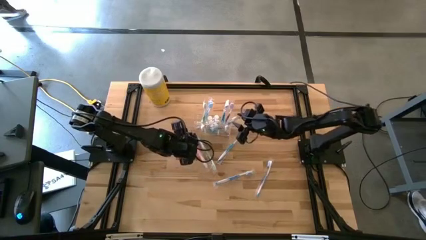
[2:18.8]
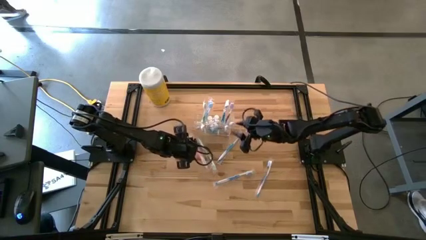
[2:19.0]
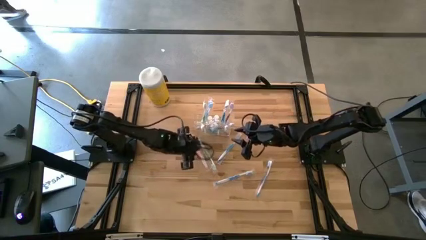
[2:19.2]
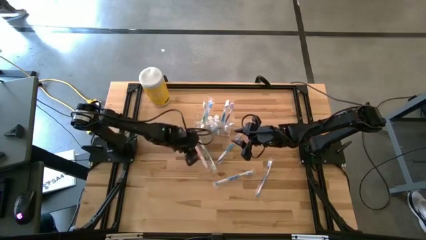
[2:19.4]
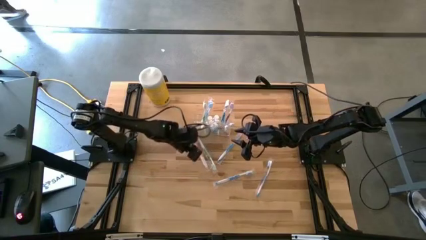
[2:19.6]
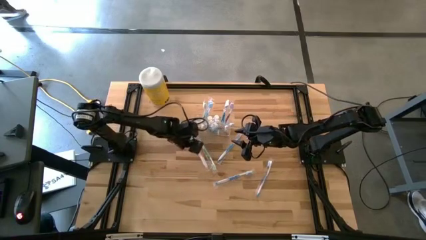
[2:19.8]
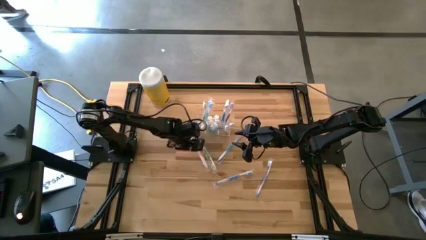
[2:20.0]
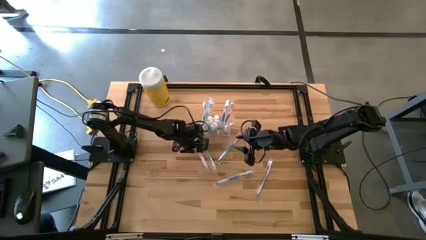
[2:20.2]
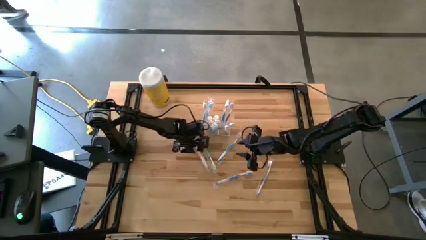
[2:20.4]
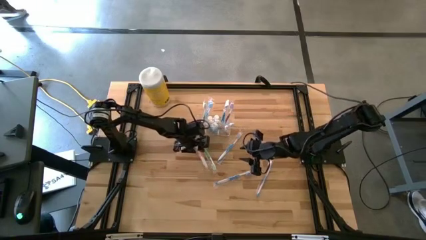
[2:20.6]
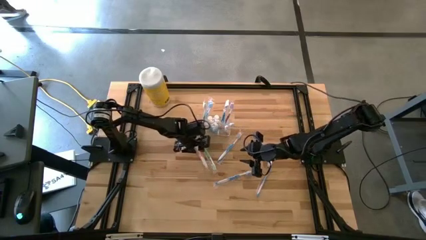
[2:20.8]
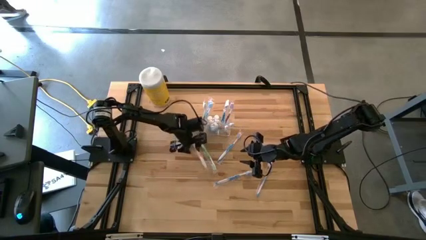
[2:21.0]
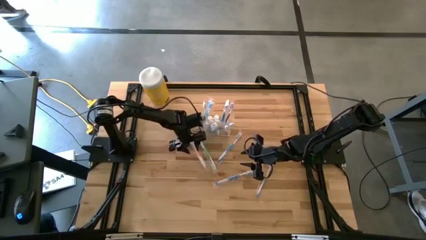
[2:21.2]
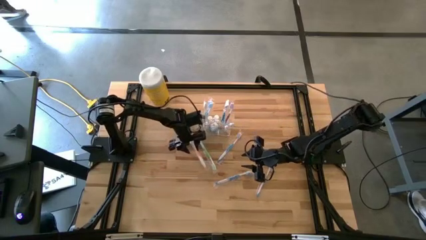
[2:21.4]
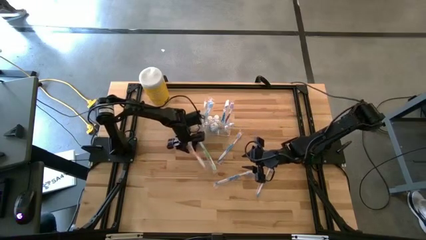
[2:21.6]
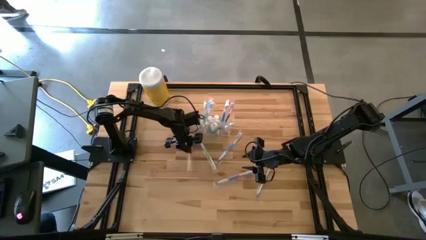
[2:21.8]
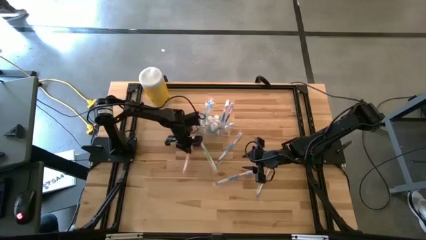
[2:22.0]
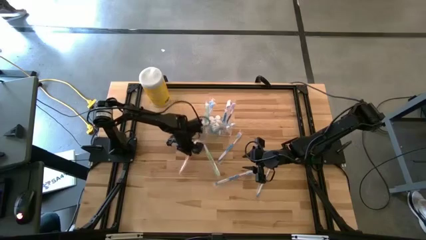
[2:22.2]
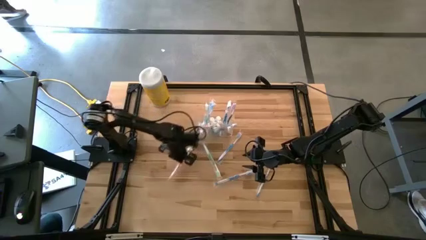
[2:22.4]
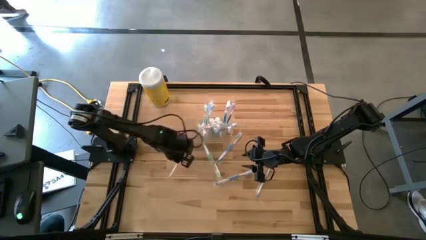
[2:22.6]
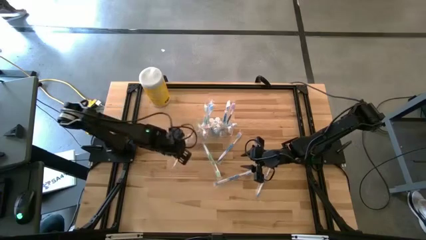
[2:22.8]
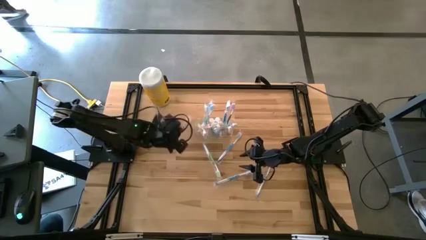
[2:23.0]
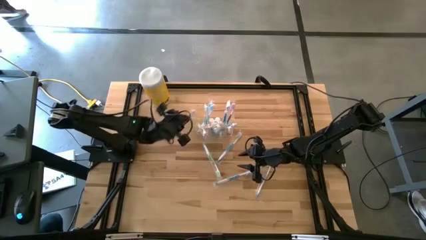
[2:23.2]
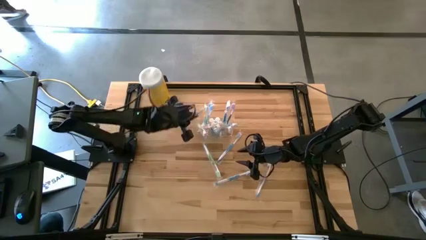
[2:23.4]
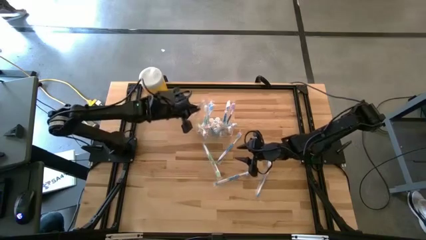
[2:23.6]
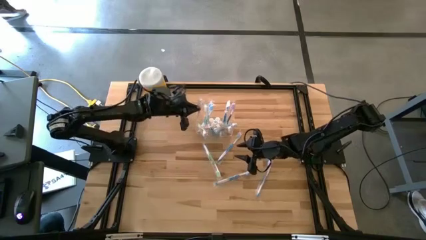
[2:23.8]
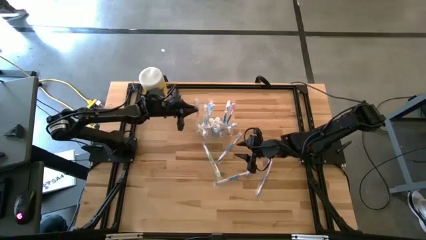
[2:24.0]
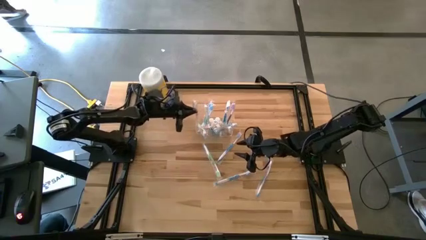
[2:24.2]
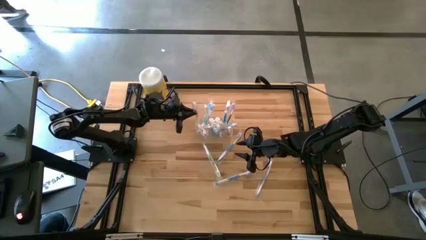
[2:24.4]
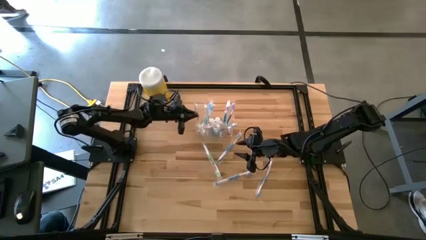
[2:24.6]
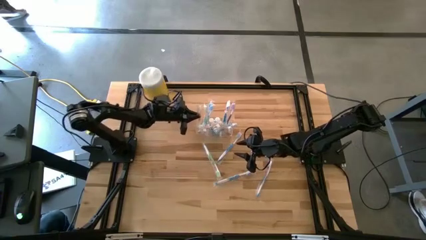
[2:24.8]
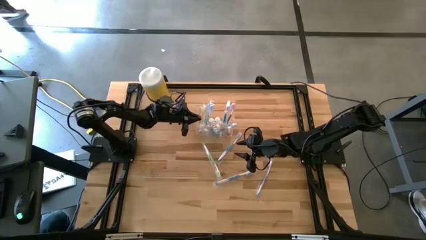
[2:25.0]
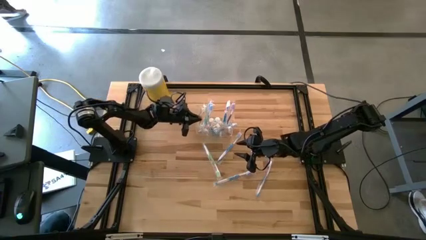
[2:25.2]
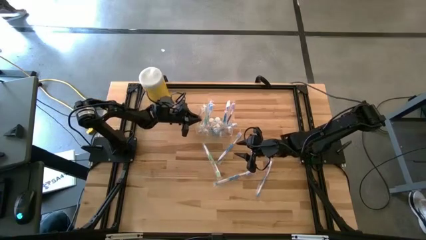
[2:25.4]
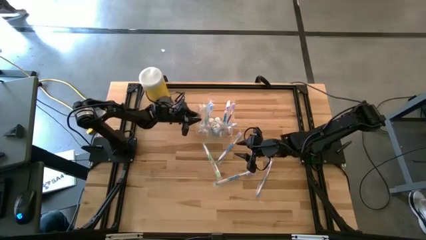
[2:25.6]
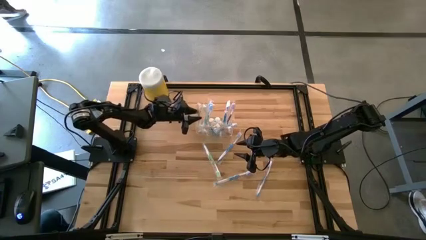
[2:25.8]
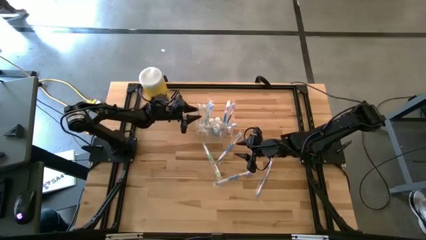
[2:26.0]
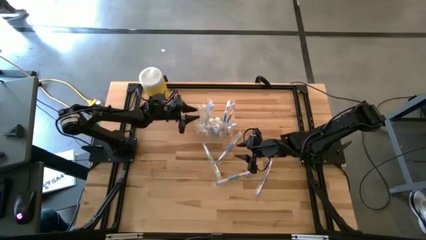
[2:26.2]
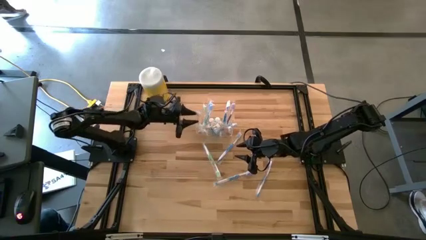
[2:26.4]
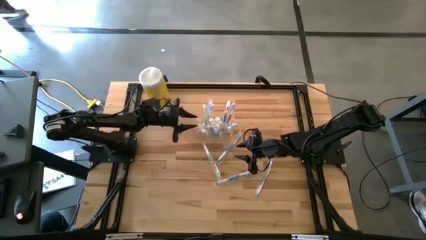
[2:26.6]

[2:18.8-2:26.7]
Task: Pick & Place toothbrushing station
Put the orange toothbrush into the transparent organizer

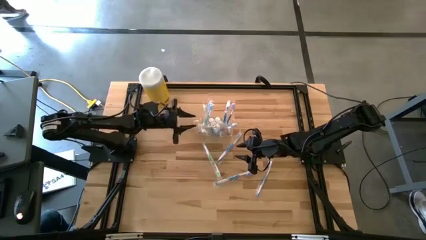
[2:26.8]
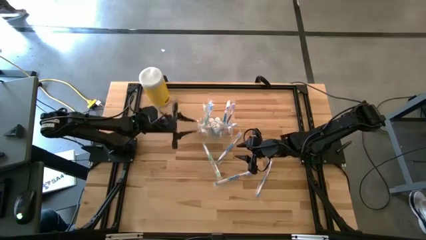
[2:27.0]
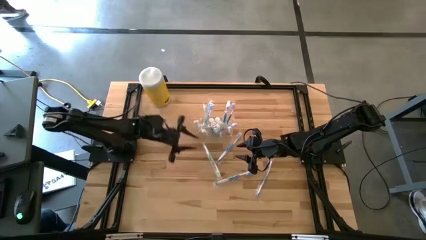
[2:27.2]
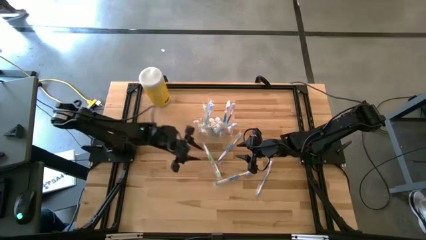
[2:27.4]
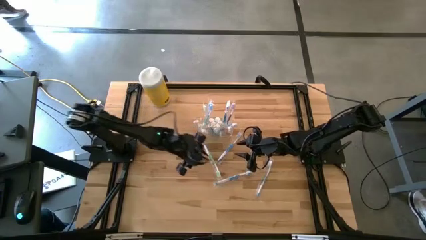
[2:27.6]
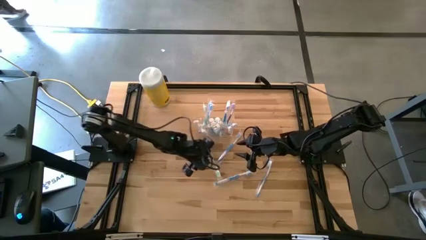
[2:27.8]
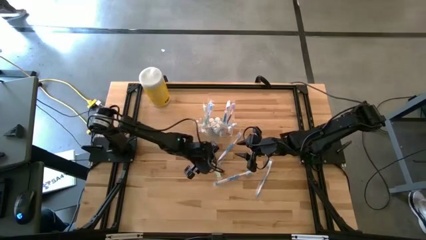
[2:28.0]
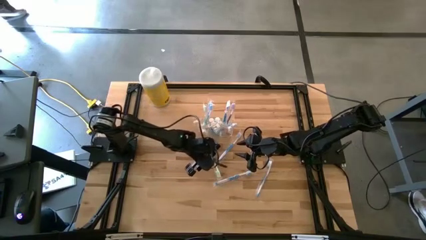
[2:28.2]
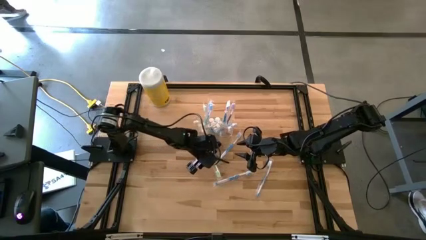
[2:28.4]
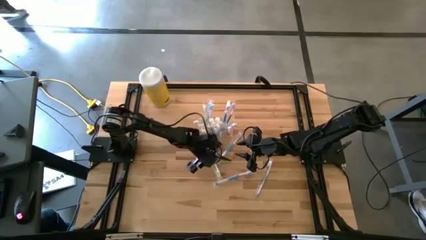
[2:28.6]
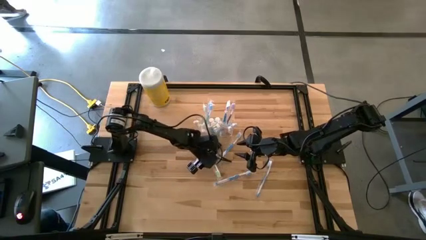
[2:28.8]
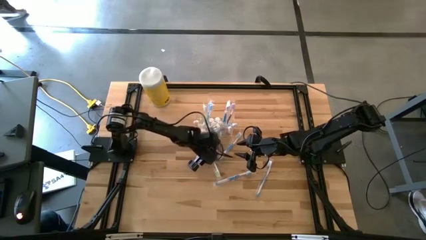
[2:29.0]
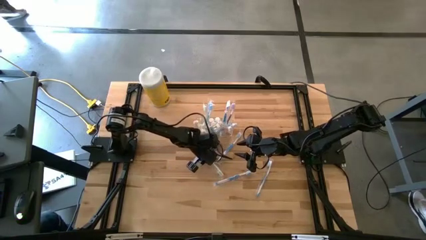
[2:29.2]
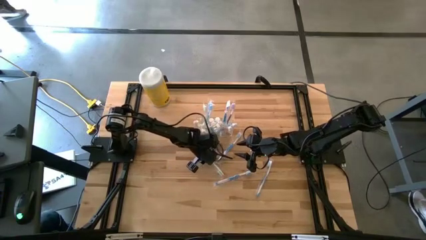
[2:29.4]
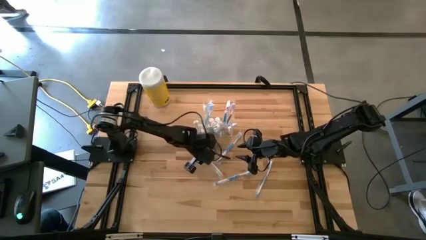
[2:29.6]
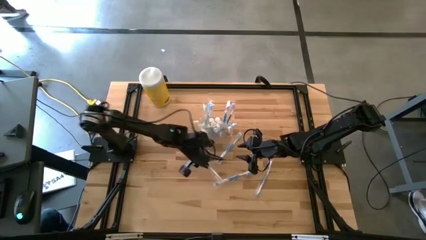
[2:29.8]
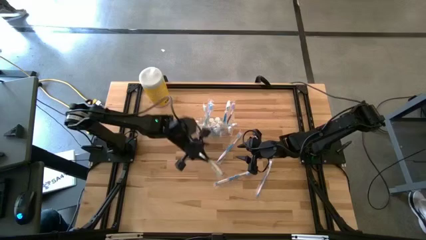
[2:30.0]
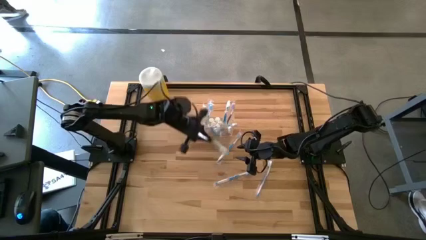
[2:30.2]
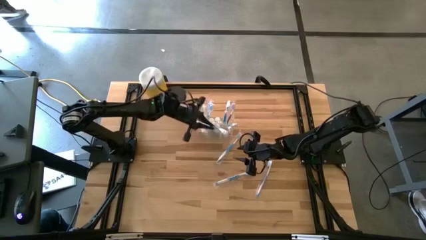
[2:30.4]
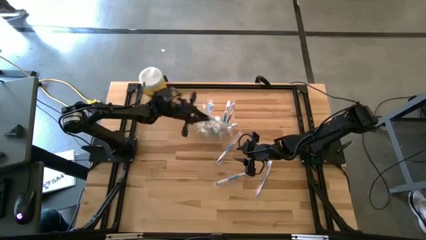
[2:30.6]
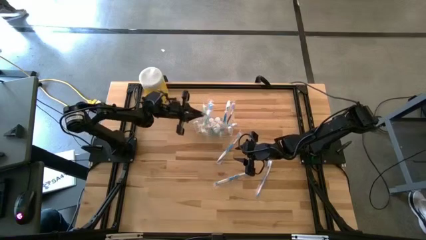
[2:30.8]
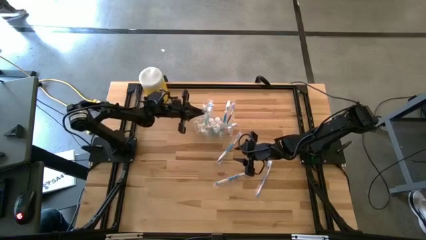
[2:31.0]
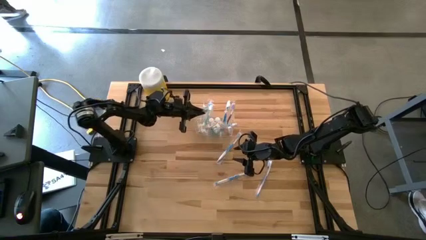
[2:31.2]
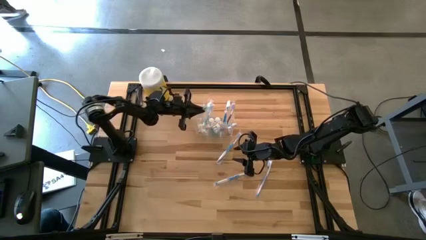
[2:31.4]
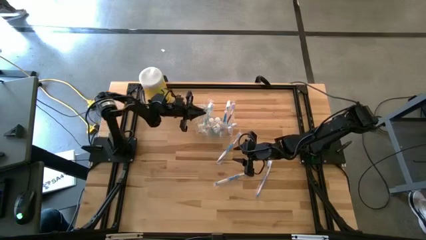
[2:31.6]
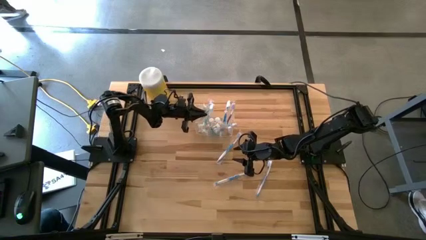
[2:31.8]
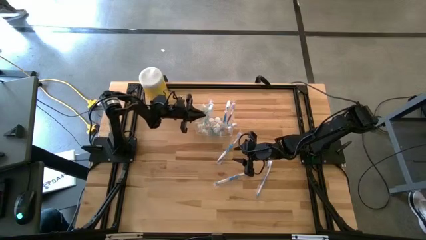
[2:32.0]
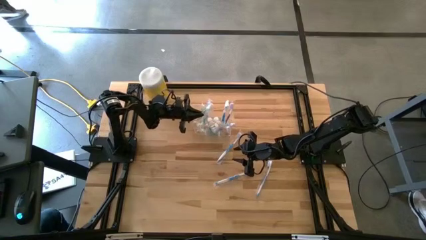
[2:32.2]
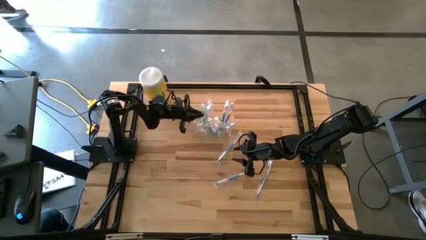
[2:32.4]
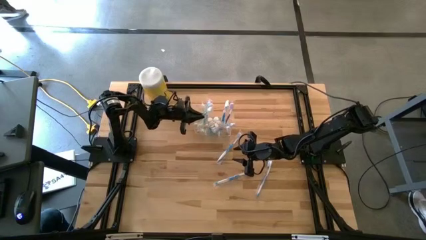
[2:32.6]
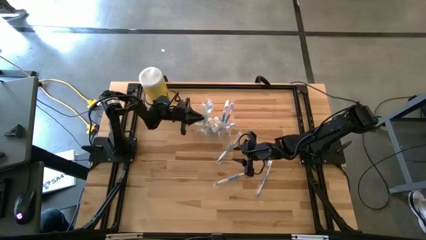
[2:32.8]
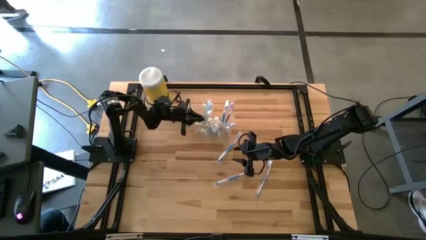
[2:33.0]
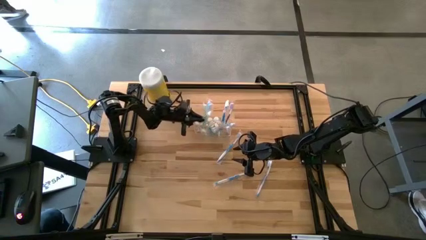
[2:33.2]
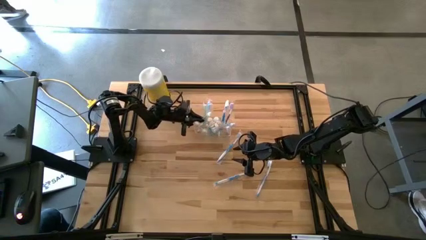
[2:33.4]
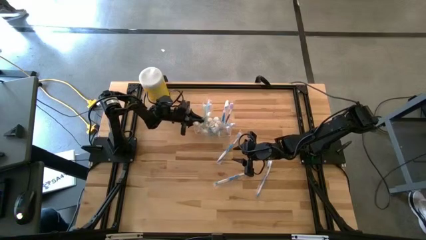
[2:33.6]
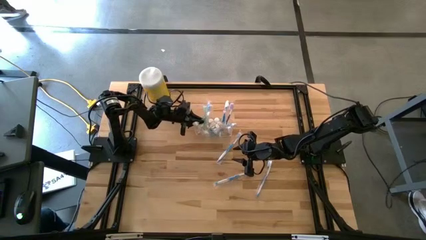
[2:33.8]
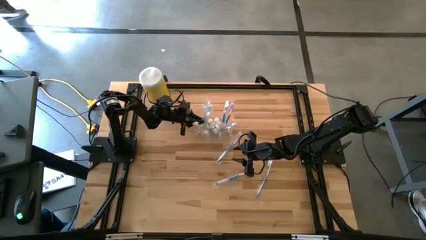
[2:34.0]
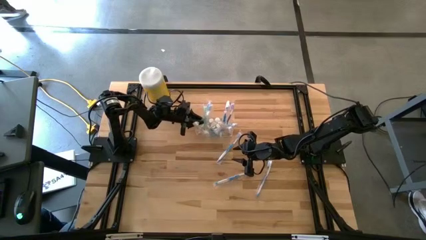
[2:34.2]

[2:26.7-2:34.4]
Put the green toothbrush into the transparent organizer

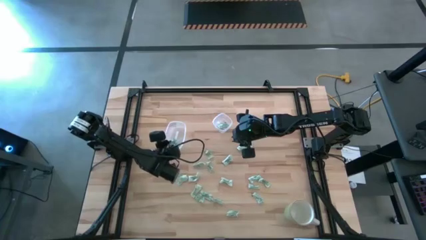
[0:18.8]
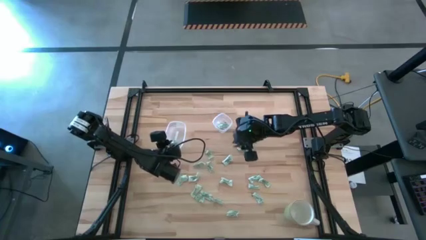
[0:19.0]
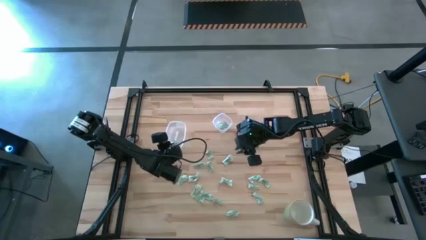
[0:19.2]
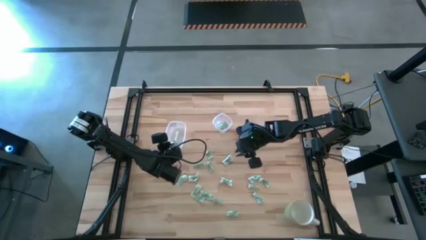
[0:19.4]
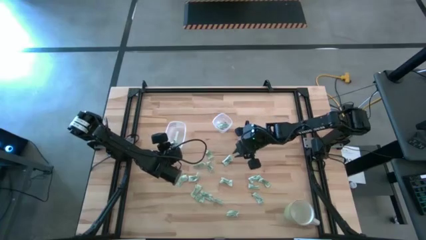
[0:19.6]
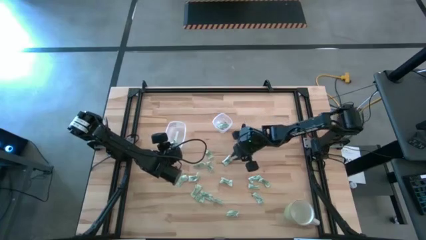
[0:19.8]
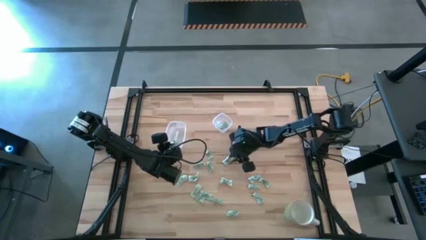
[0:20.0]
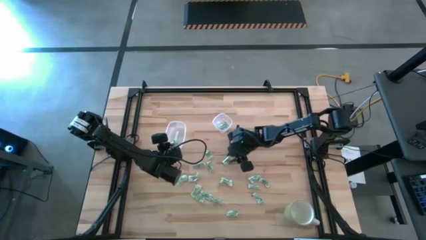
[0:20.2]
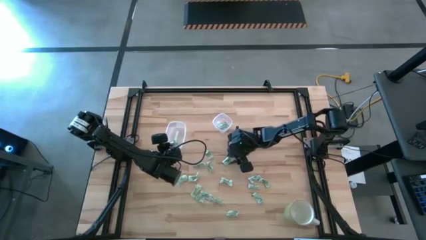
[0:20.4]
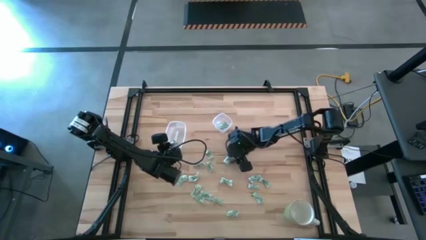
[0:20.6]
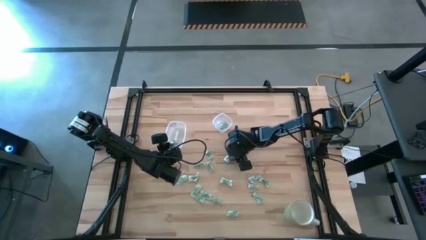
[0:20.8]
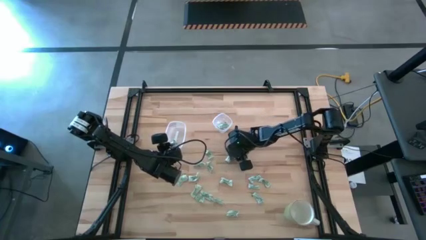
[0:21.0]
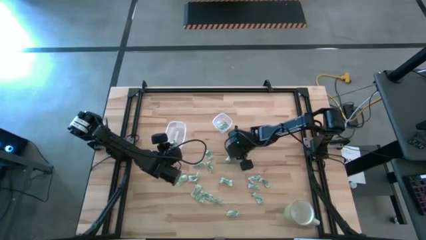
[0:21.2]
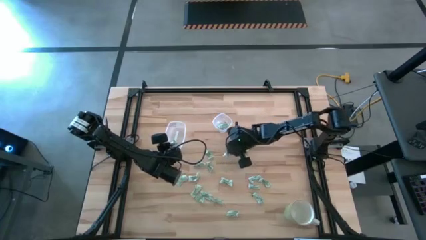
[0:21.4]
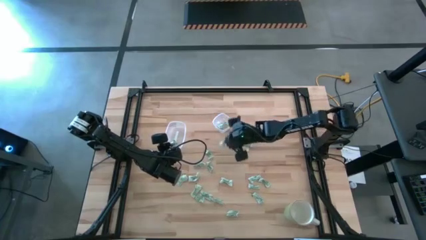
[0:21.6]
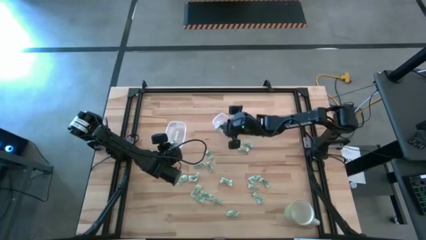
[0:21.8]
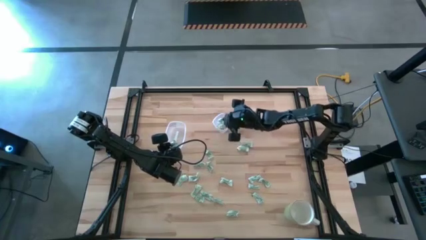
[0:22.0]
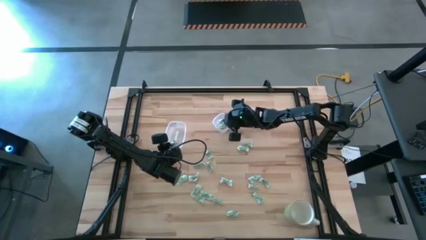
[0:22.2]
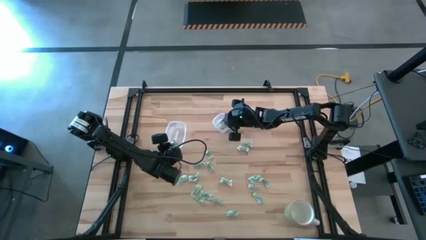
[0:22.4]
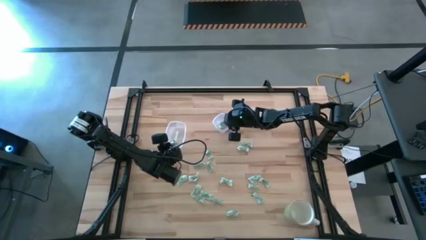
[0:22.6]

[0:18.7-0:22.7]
Task: Pick and place items into bin
Put the stevia packet into the small transparent container
